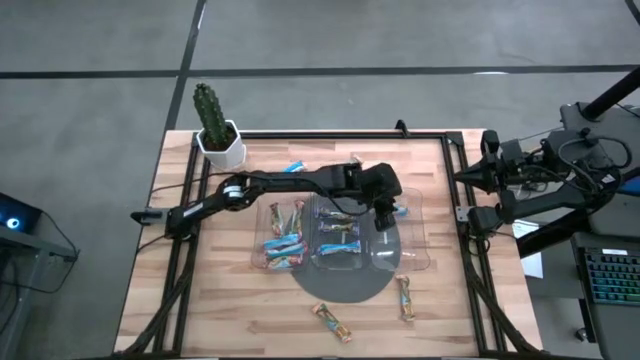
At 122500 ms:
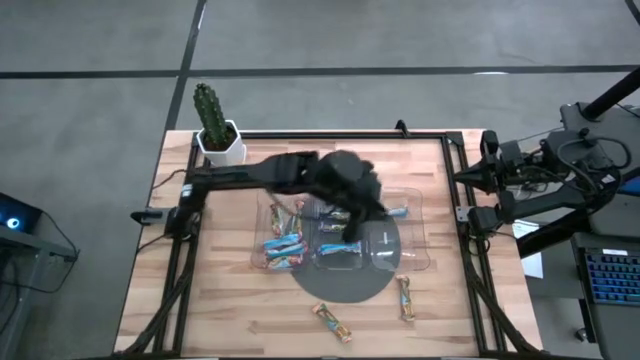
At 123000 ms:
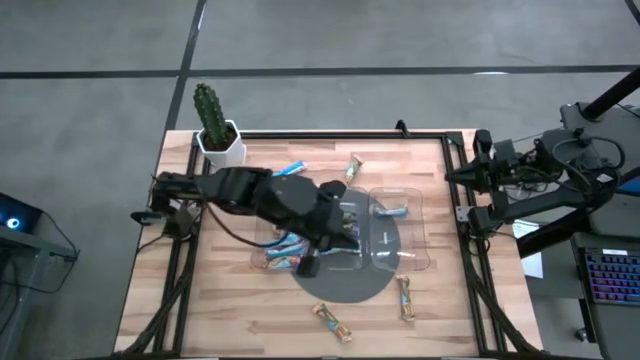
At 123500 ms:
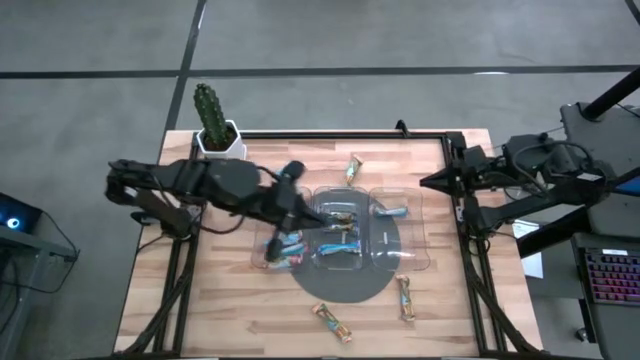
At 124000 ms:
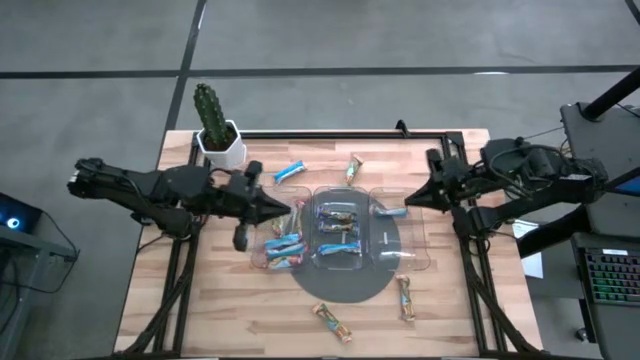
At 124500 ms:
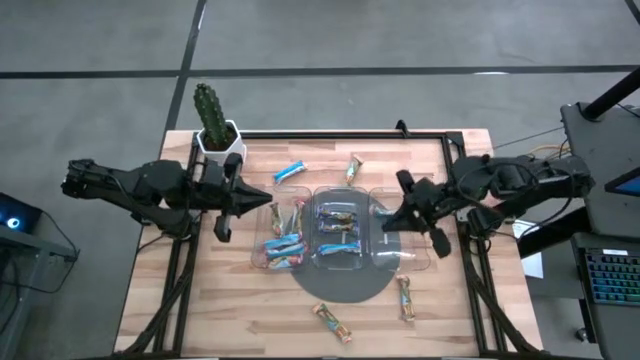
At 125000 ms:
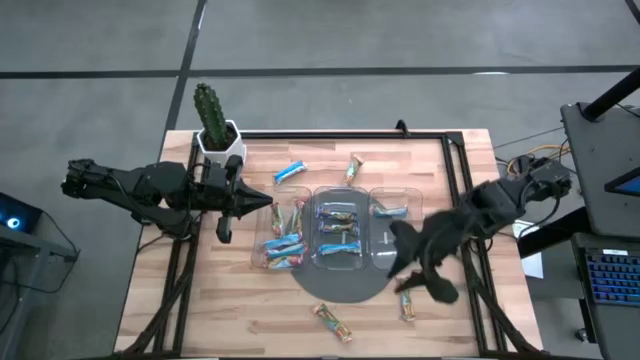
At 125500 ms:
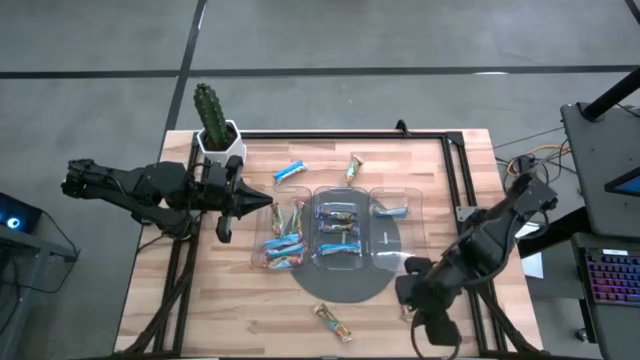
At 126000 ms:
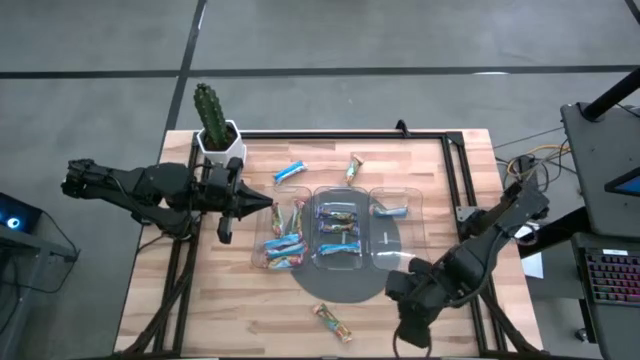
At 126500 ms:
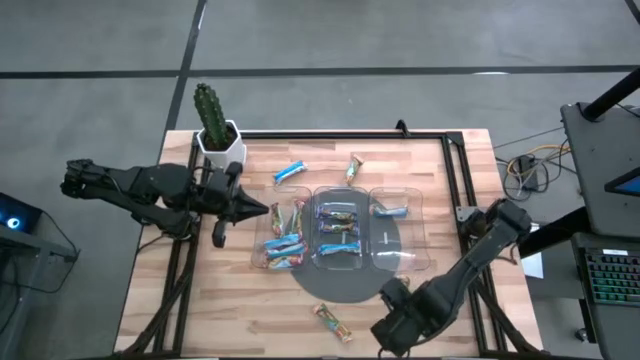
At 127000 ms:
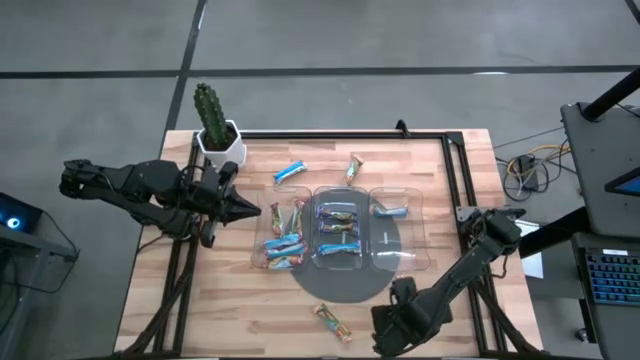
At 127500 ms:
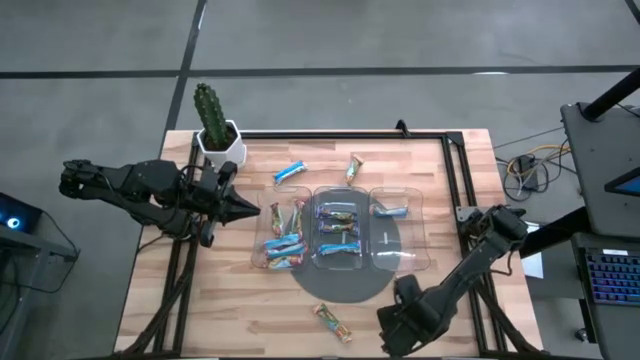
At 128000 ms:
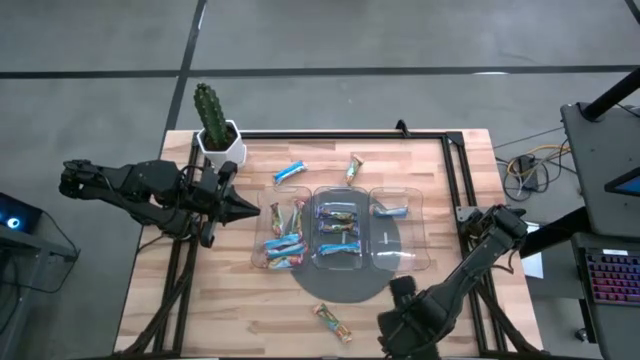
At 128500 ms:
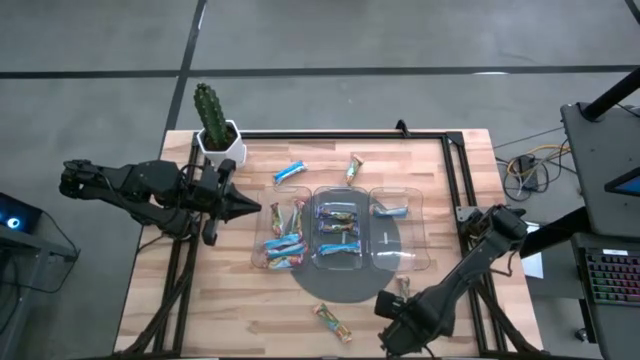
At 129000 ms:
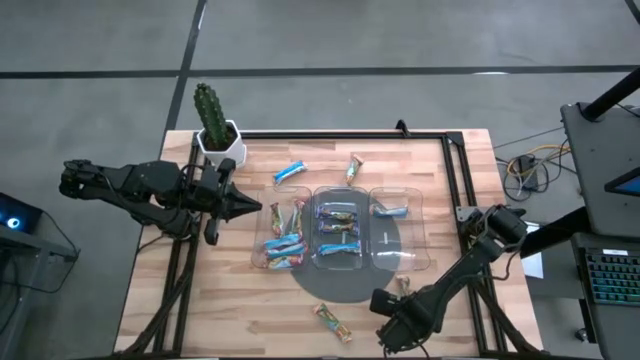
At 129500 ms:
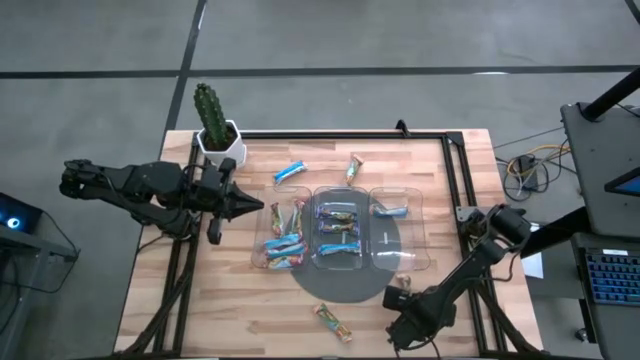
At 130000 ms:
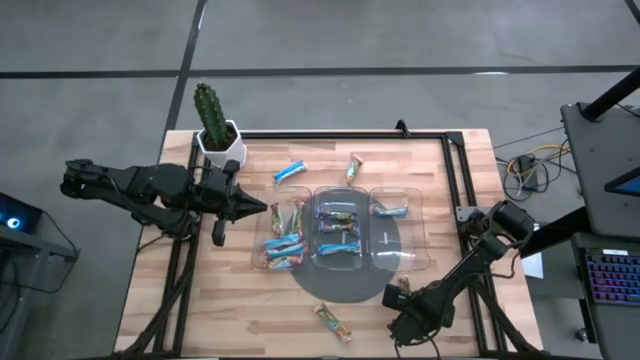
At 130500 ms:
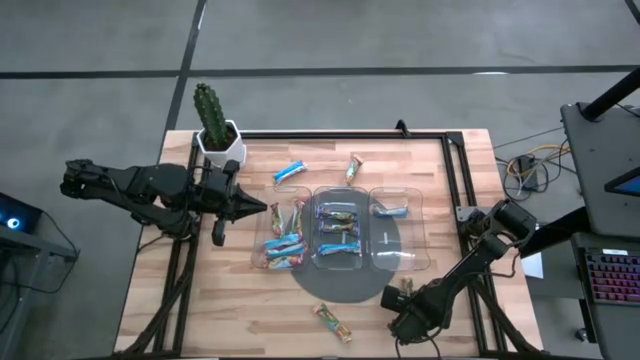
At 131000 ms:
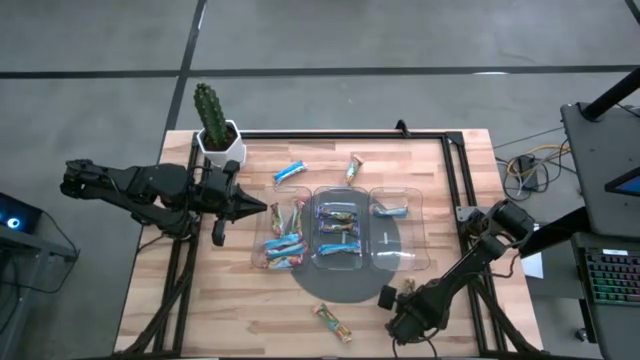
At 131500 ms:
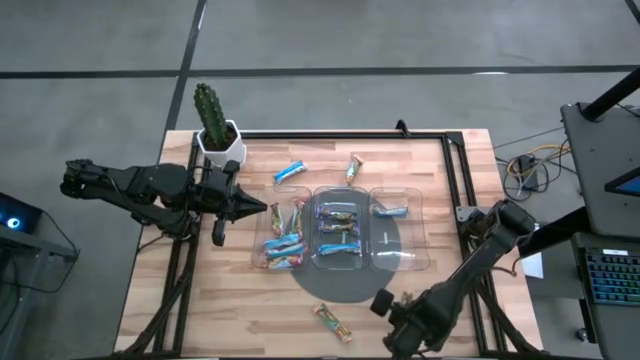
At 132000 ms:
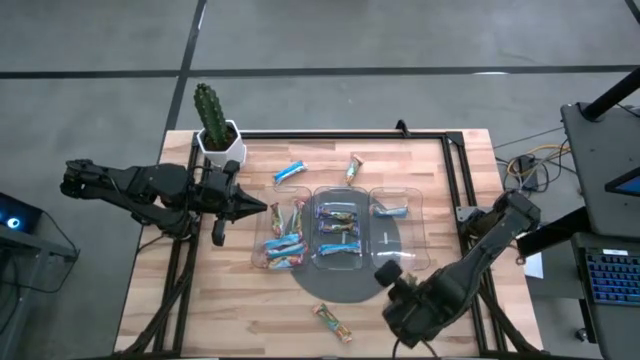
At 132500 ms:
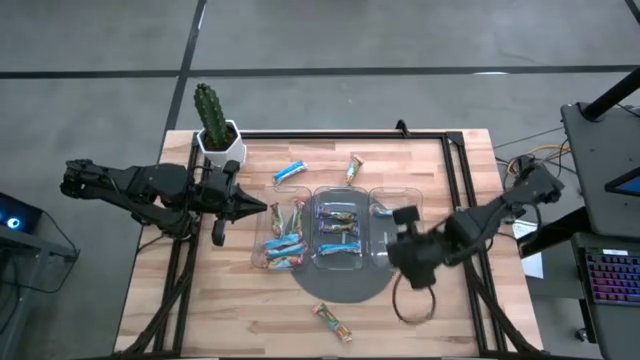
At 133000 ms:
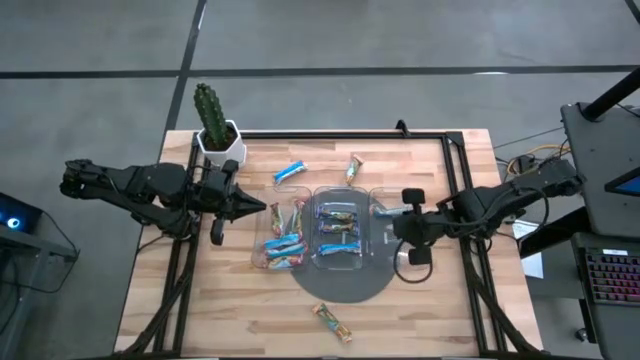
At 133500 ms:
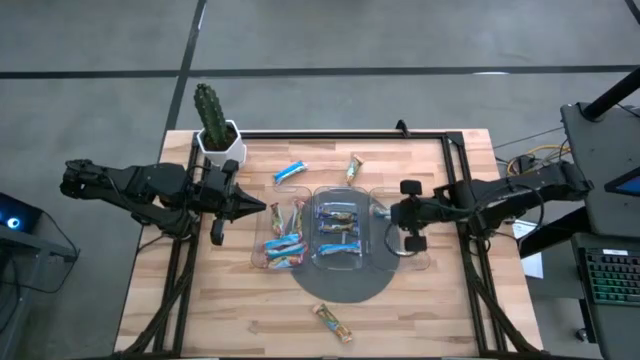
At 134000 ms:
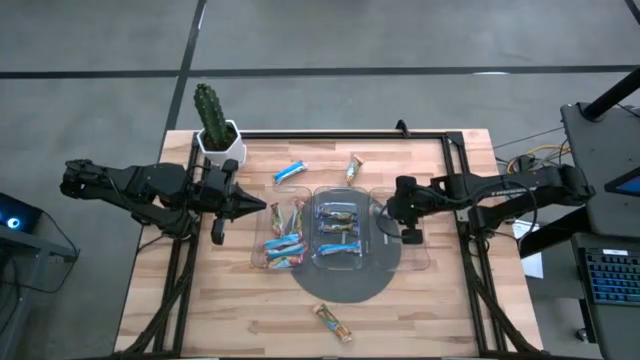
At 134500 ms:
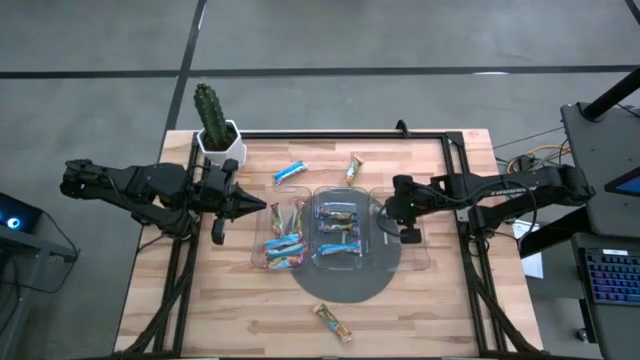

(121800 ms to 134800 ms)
Task: Pick and place Granola Bars by type
Put the yellow granola bar into the right transparent bin

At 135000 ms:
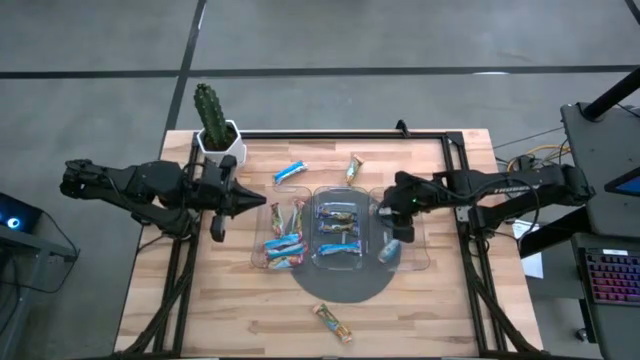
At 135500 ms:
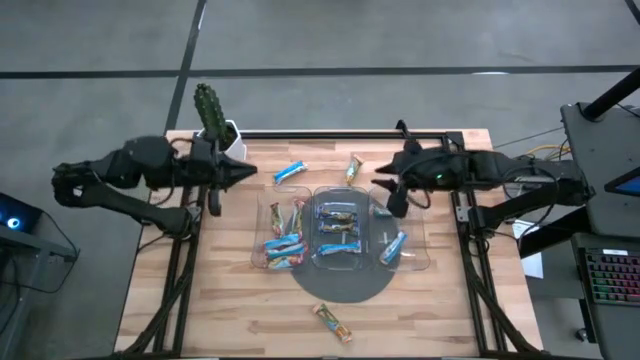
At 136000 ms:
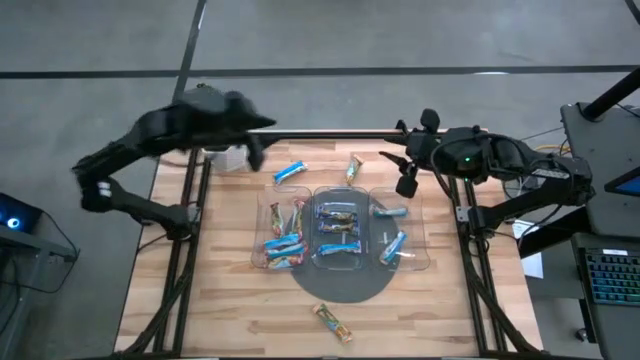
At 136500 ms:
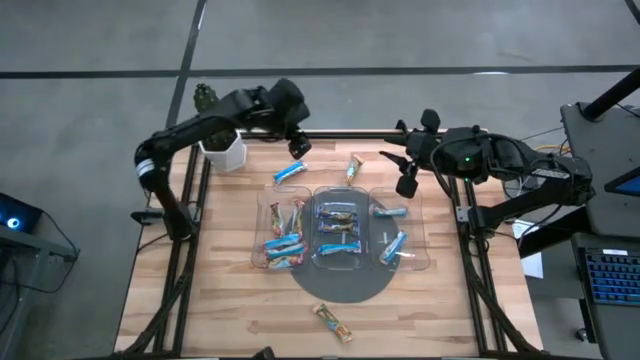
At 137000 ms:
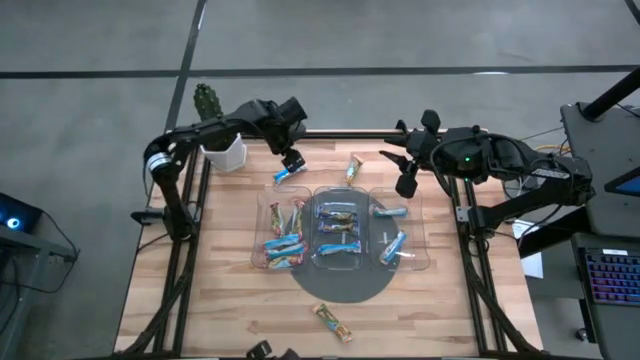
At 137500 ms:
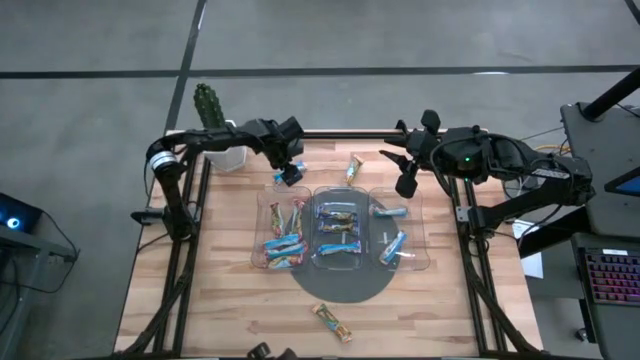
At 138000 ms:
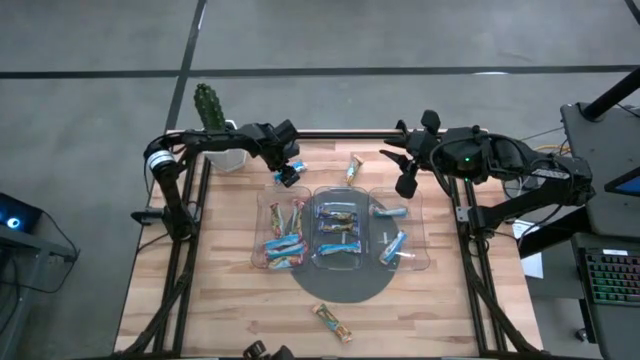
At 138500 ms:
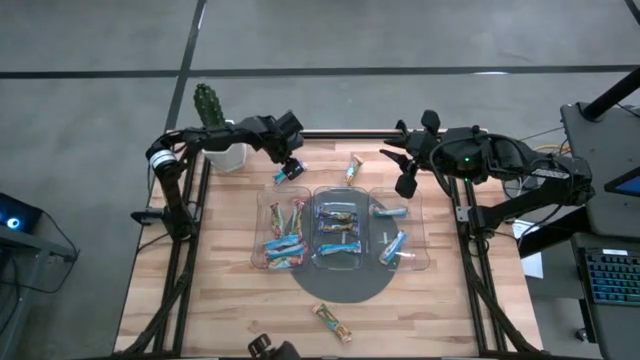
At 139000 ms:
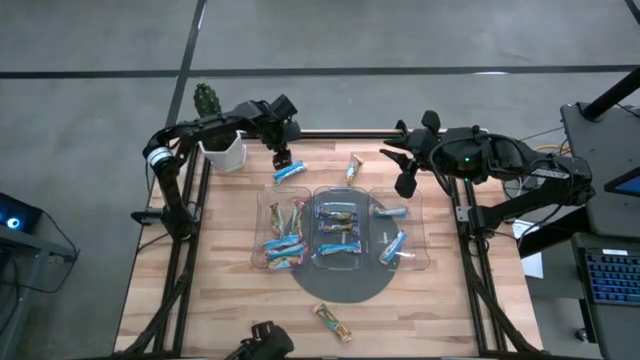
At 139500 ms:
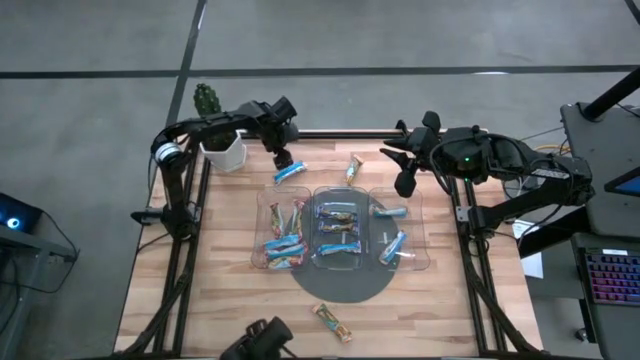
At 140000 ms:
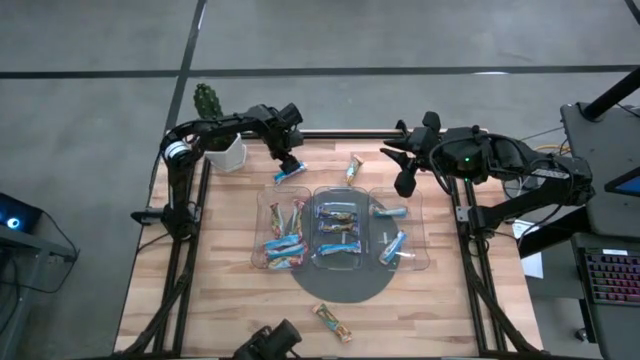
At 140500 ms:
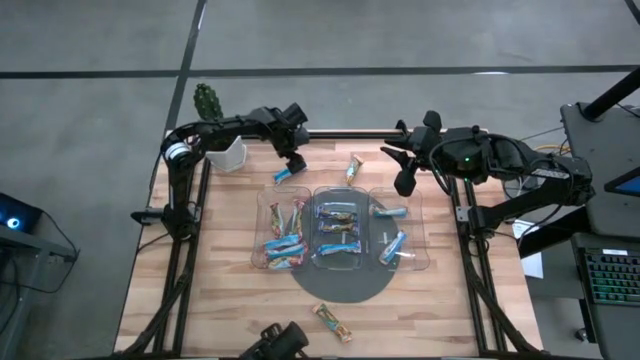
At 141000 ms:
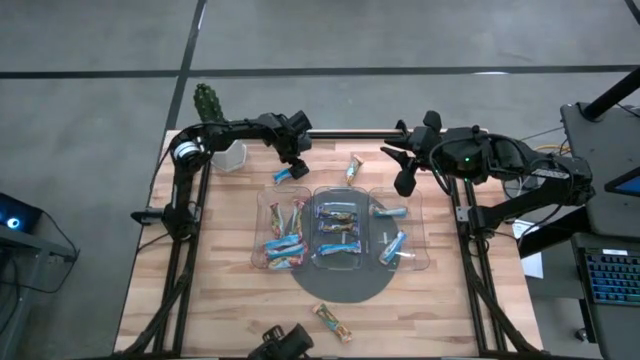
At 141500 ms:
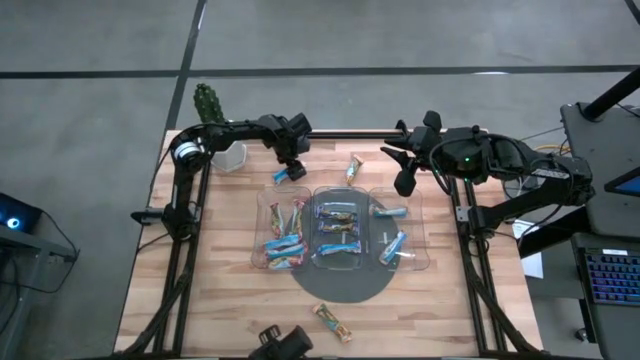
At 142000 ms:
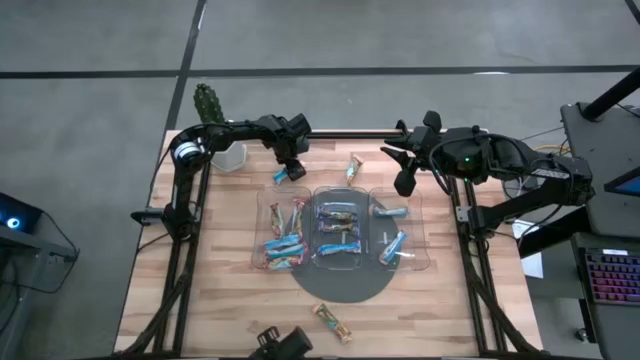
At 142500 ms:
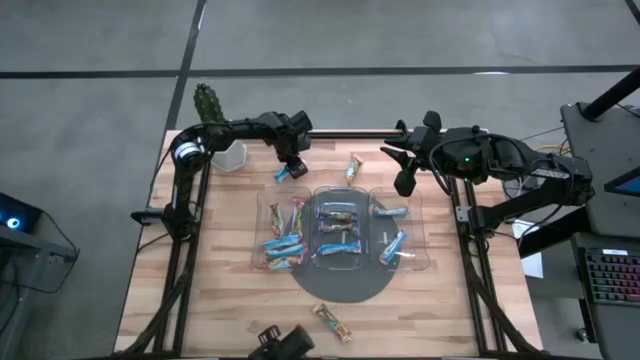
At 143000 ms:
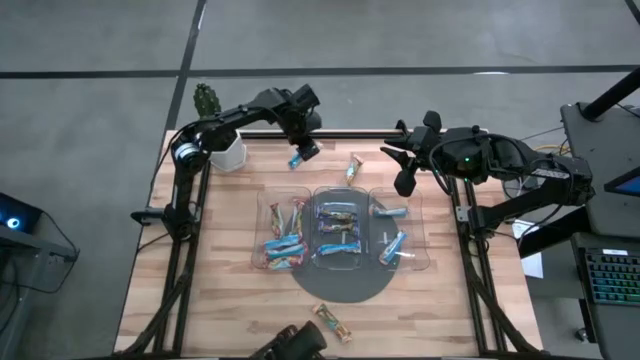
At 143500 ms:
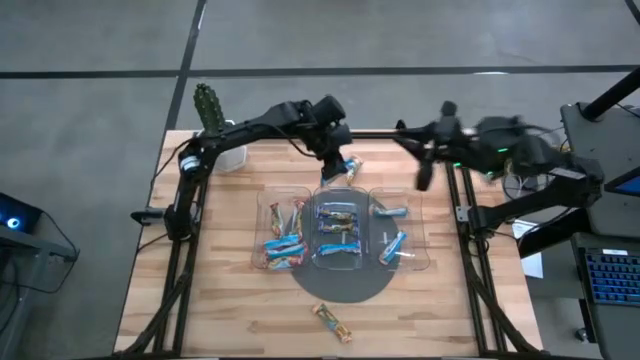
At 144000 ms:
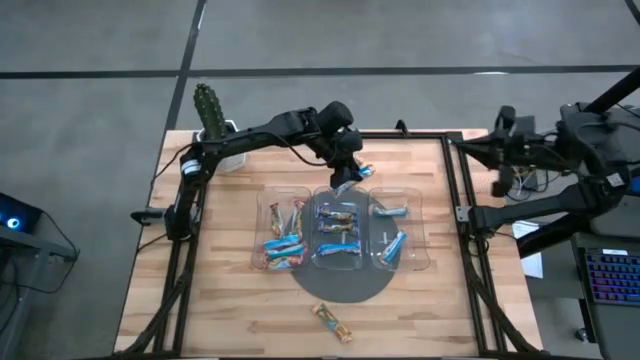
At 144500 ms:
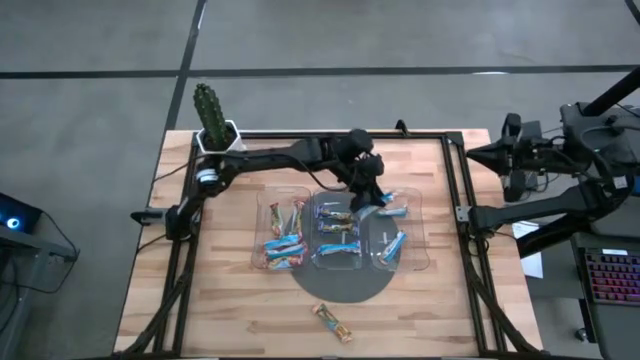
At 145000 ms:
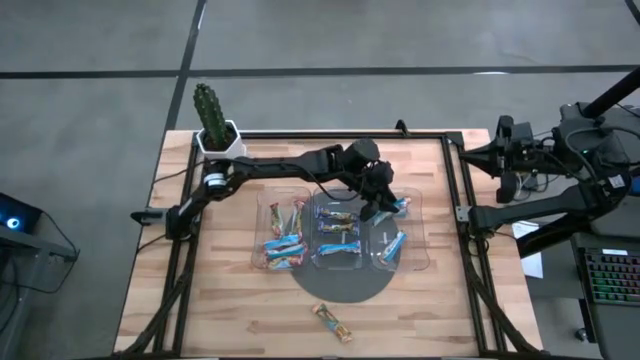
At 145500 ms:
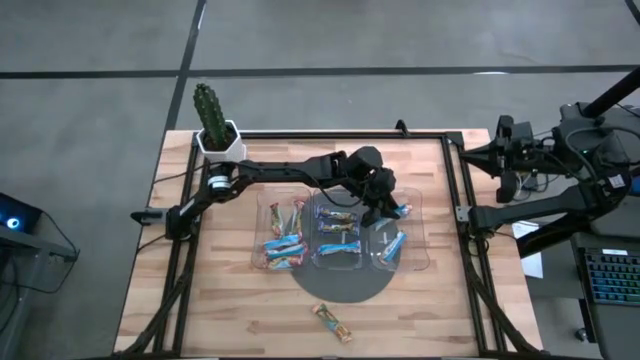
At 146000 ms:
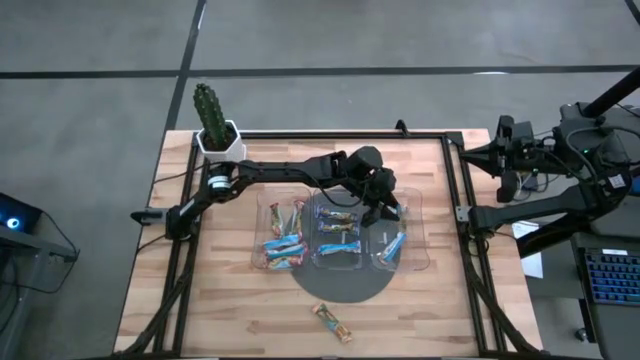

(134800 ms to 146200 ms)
Put the yellow granola bar into the right transparent bin
